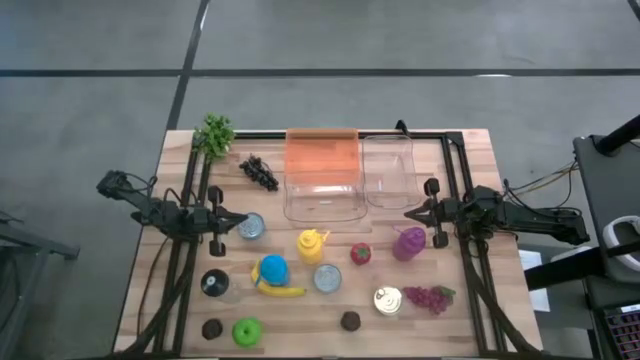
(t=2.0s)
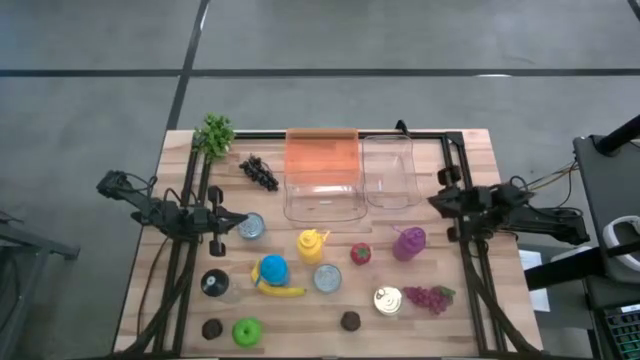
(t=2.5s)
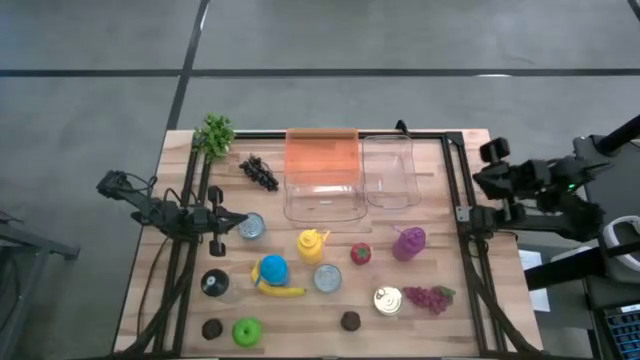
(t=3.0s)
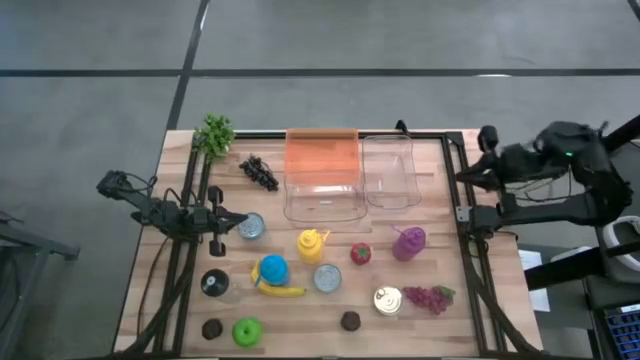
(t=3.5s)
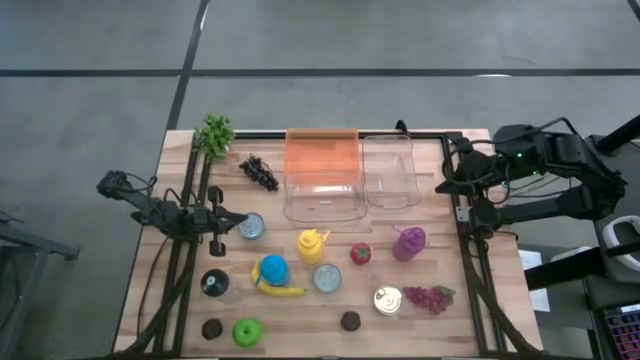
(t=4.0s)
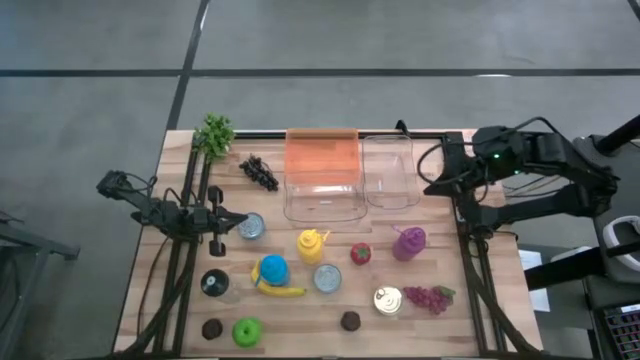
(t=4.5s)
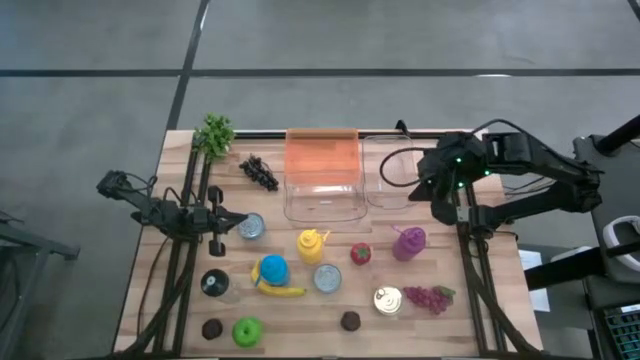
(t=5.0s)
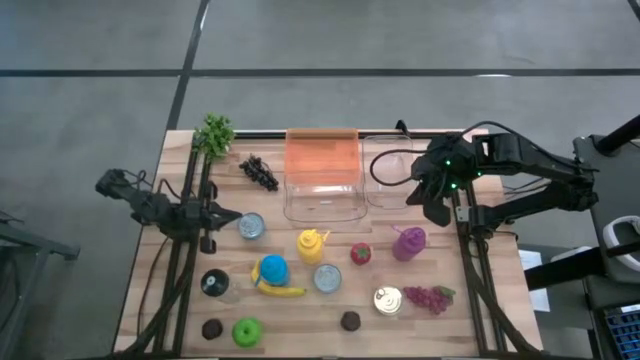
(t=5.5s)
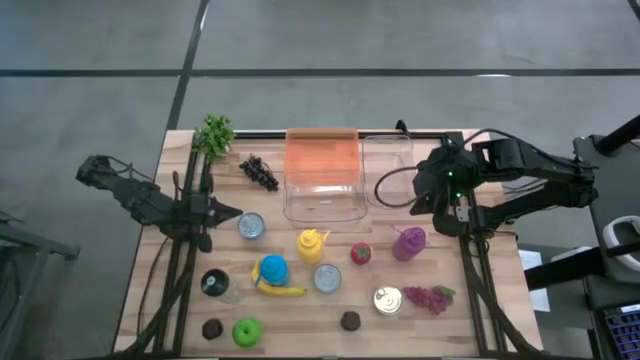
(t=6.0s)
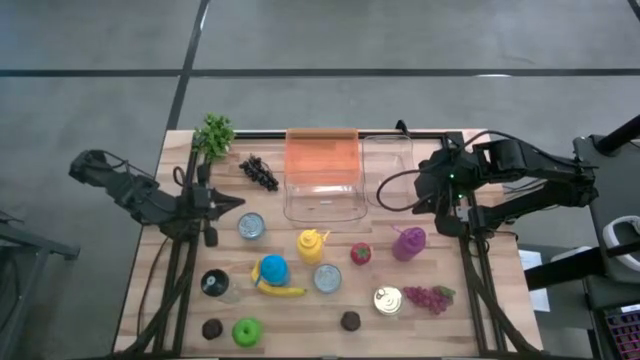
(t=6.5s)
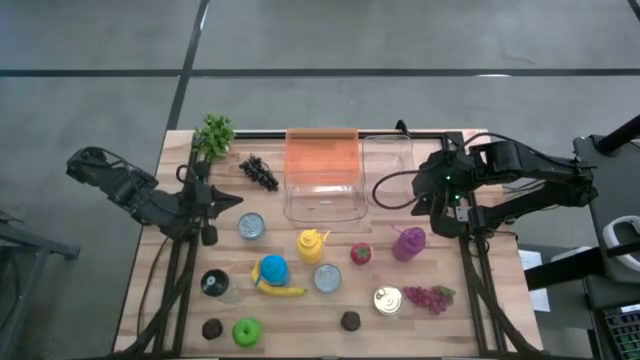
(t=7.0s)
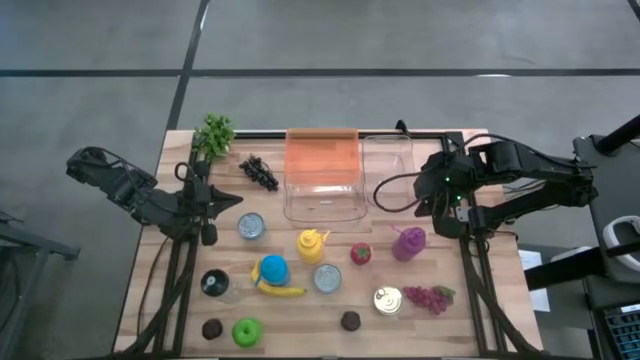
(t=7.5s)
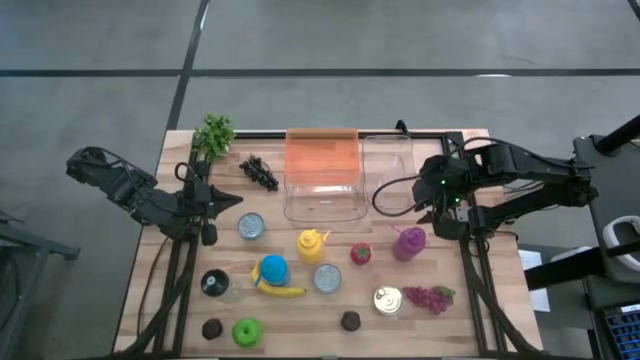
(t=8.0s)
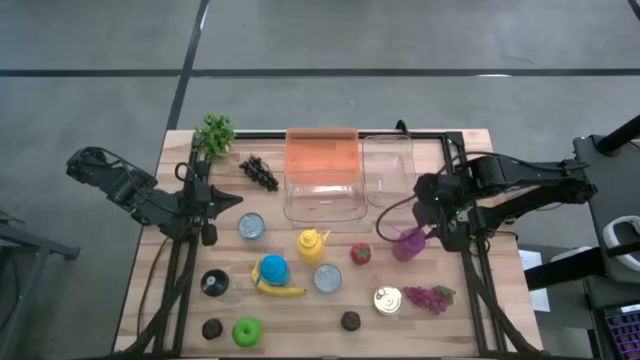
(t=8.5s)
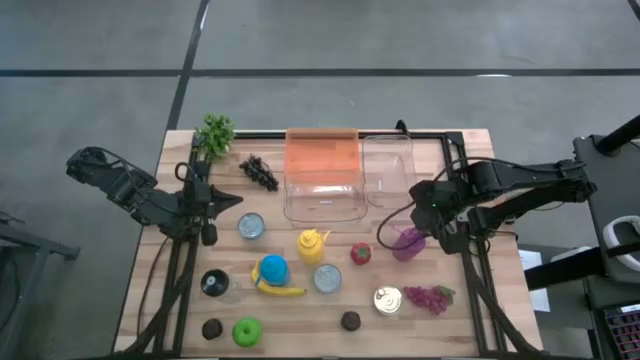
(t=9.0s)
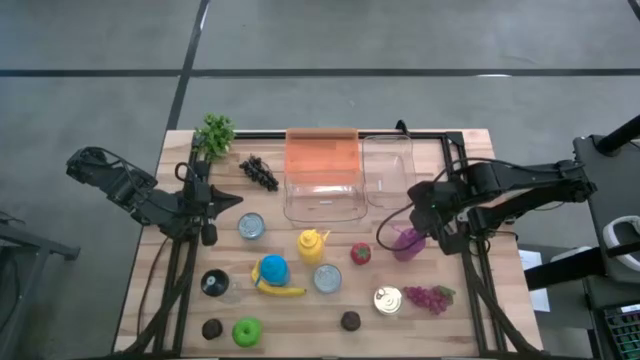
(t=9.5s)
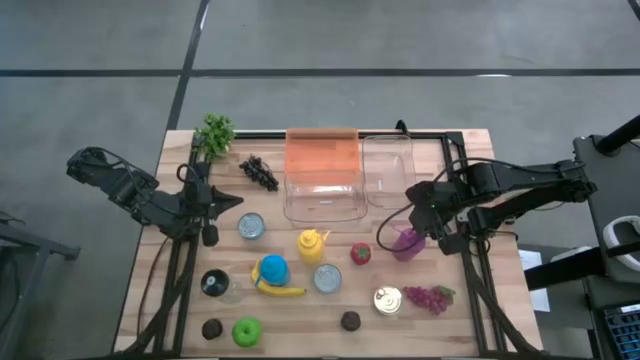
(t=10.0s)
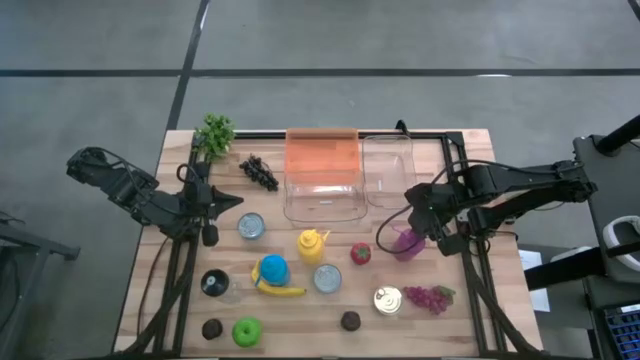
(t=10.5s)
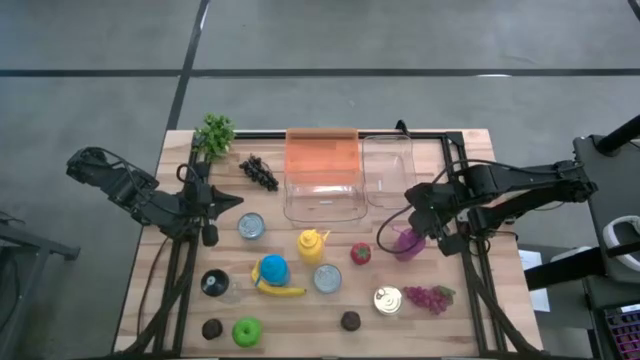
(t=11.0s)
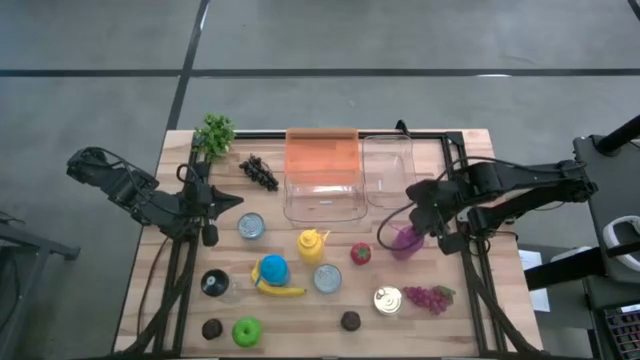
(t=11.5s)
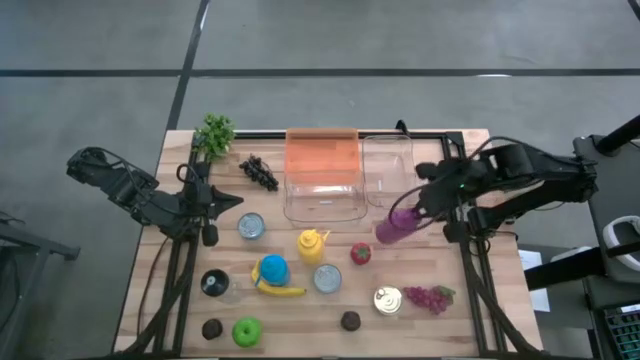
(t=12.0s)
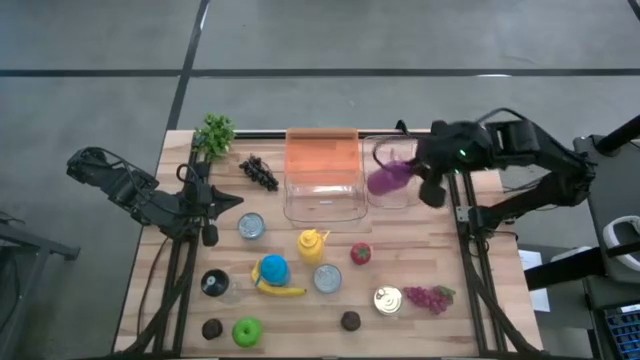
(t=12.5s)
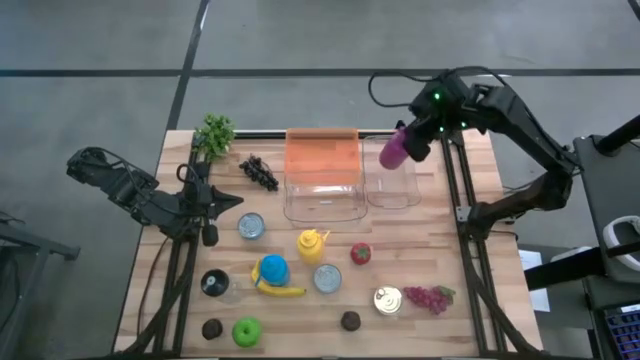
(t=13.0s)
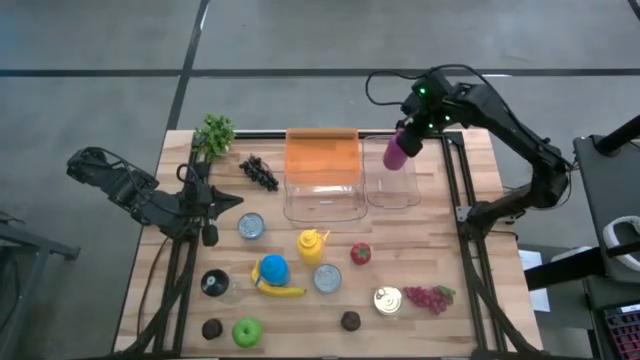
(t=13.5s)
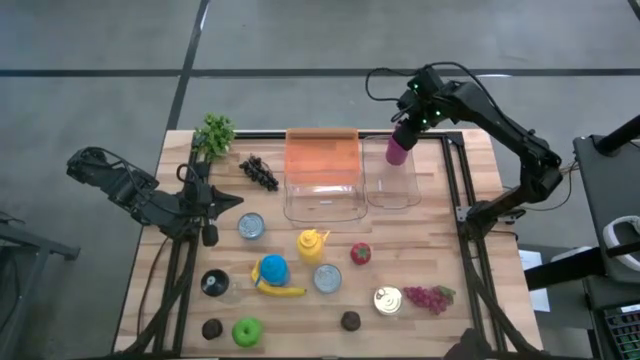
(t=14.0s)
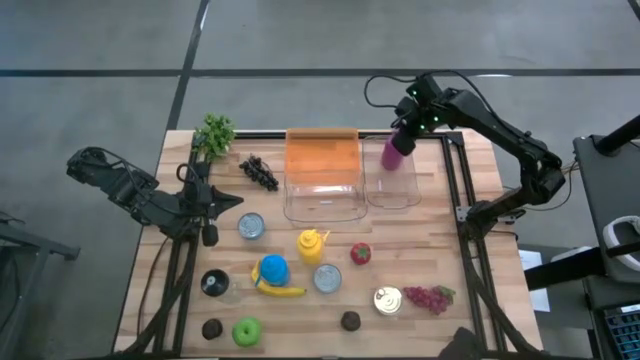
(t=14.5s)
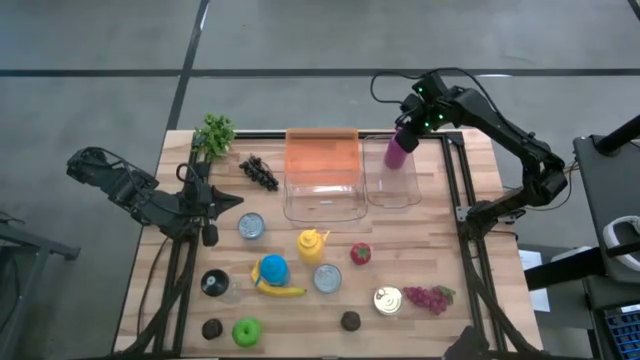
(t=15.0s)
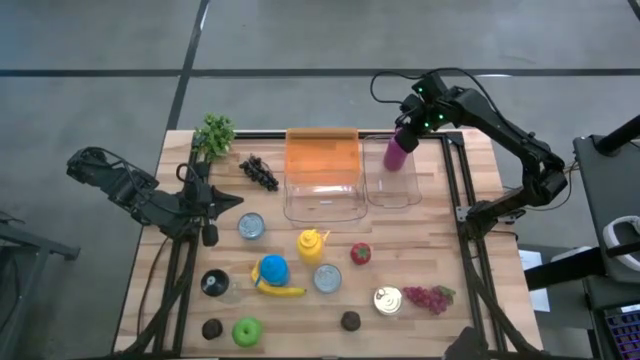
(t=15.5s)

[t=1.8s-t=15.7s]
Task: Pick & Place Food Item
Put the purple water bottle into the right transparent bin

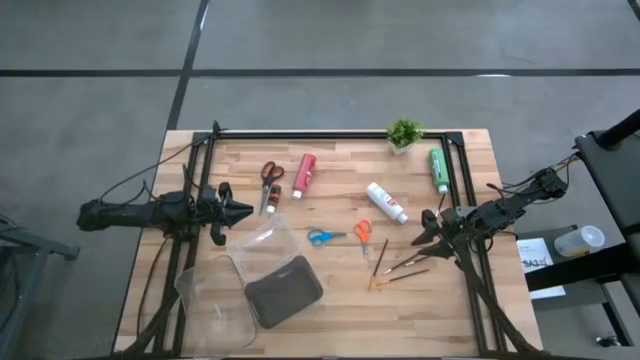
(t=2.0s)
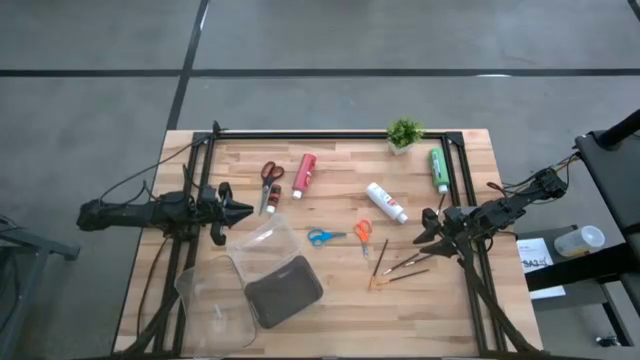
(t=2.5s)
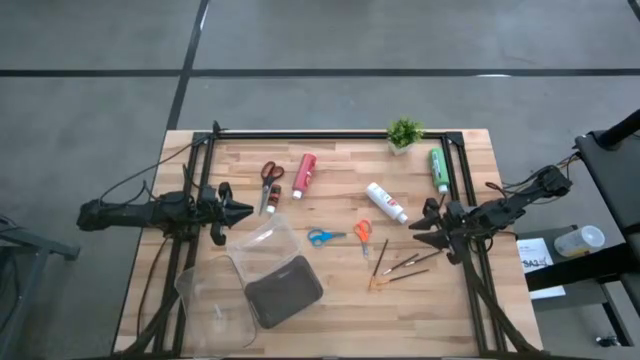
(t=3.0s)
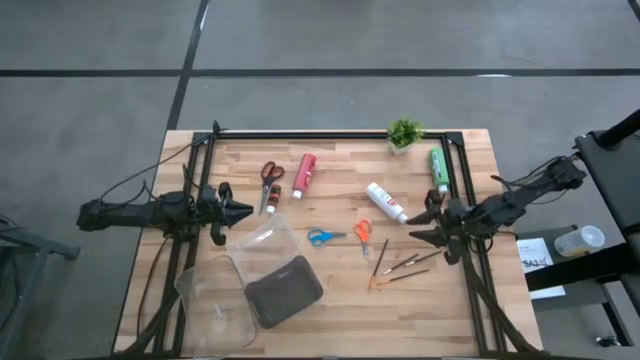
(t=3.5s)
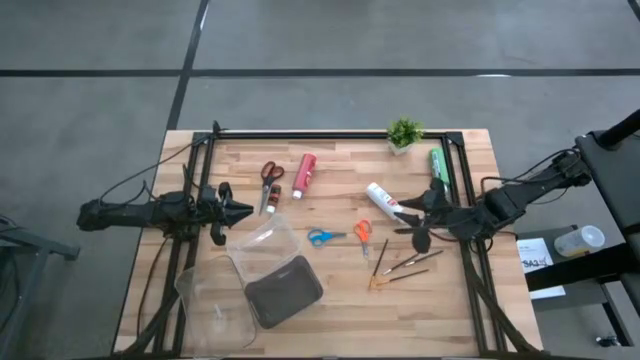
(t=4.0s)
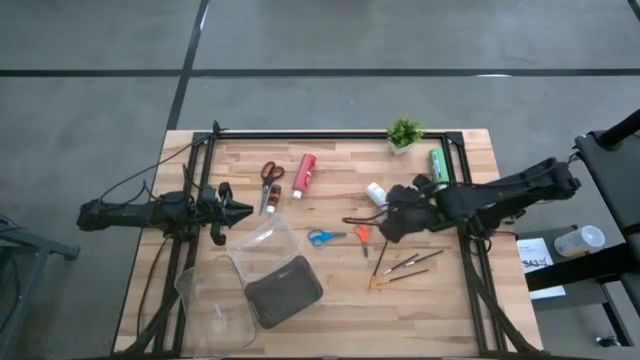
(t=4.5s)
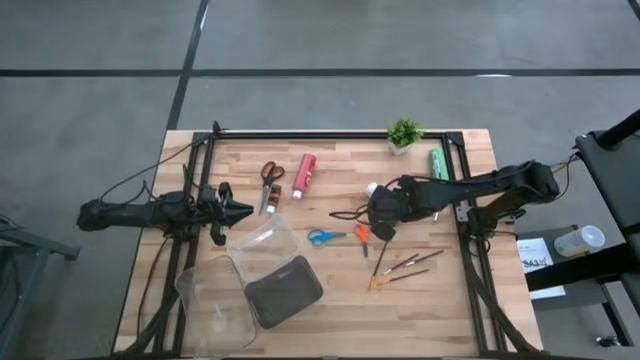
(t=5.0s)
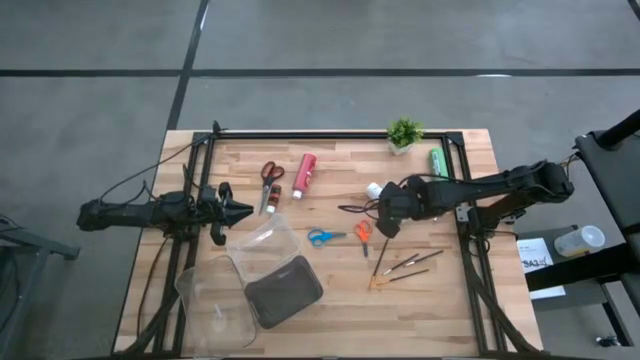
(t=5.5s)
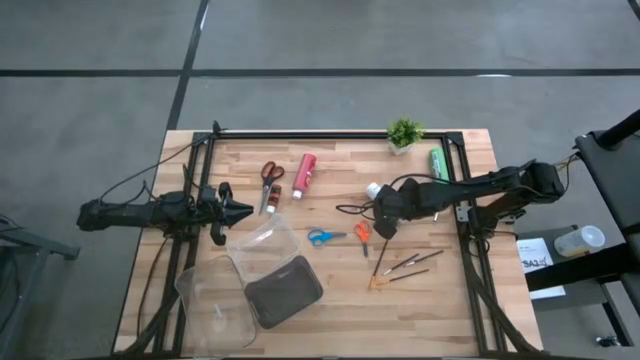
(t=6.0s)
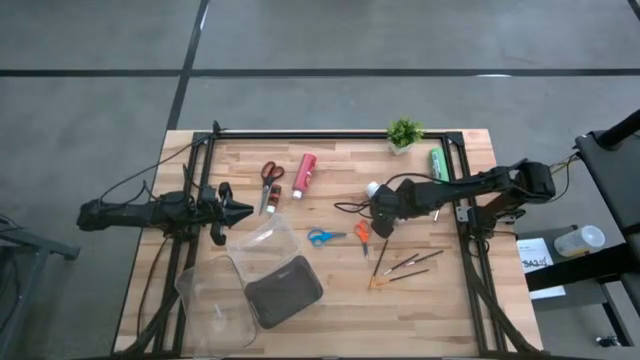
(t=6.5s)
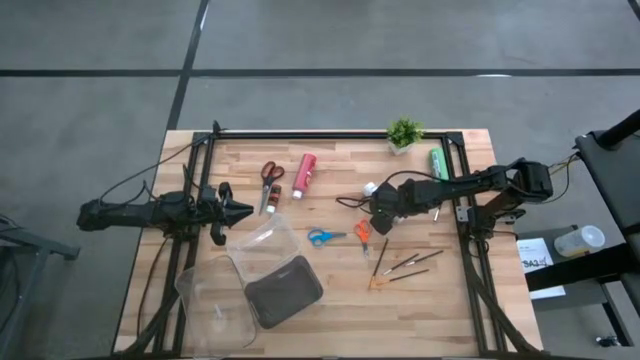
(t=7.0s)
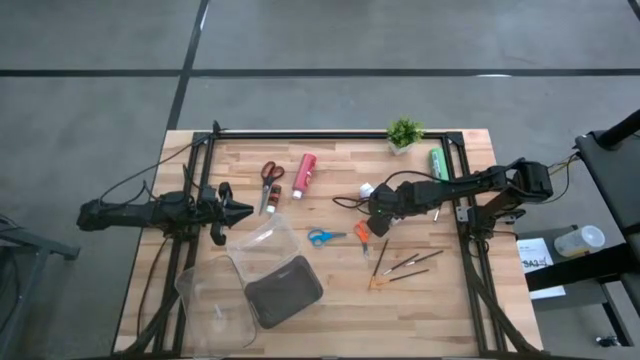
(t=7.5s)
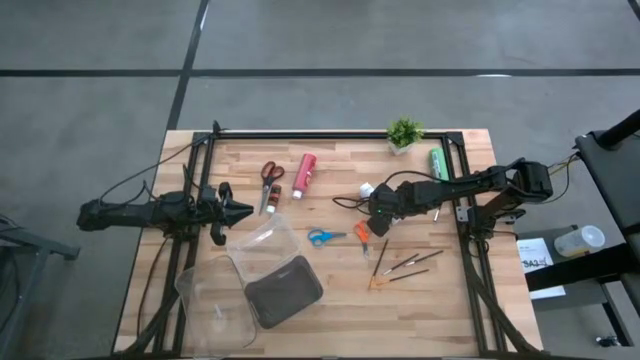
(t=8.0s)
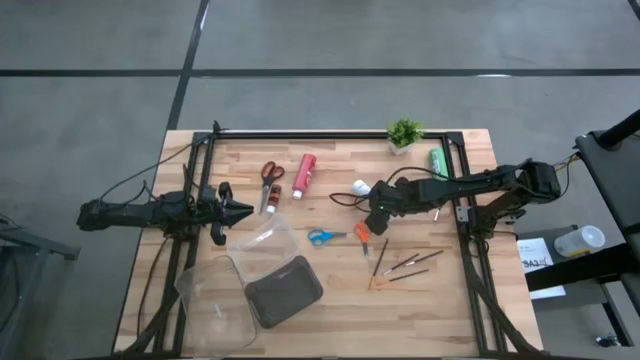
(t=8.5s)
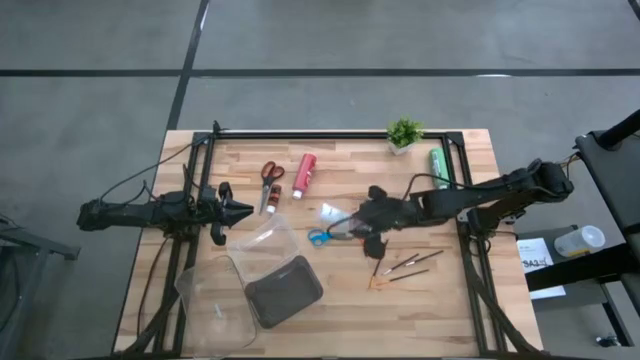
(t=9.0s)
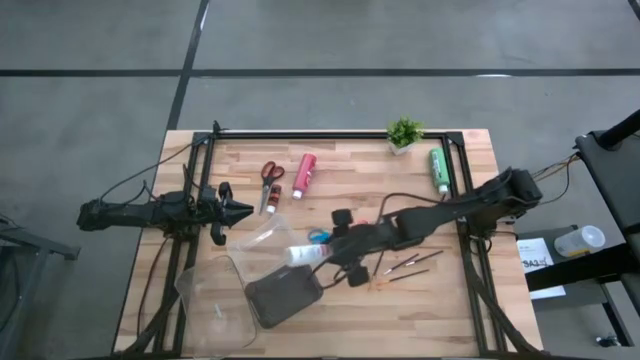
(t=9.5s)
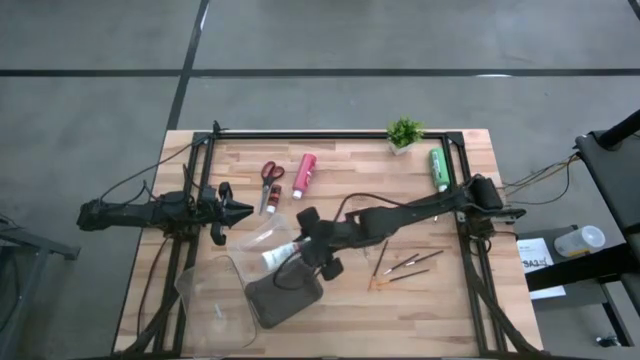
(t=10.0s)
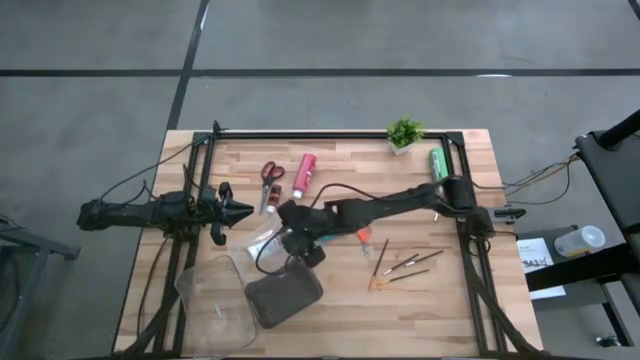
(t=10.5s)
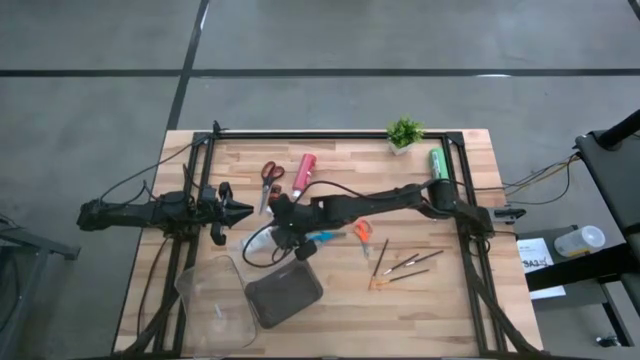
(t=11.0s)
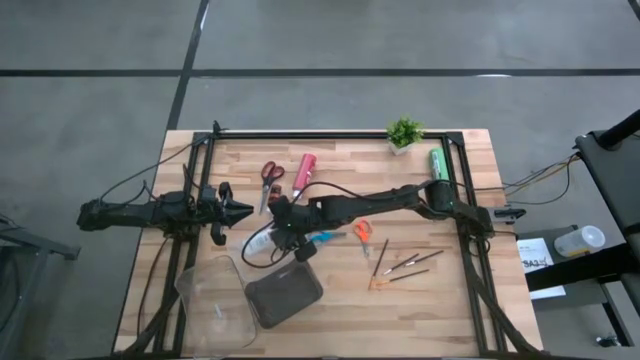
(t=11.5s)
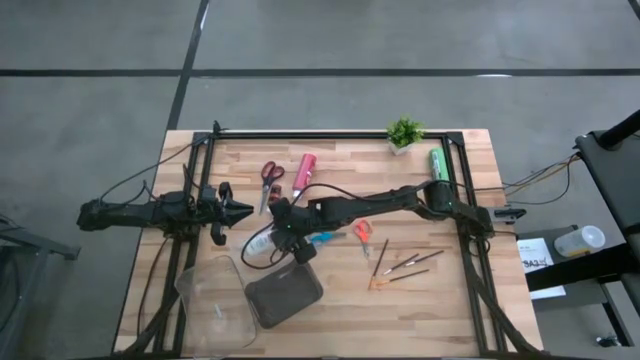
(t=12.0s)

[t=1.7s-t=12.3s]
Task: Pick & Place Paint Supplies
Put the white paint bottle into the top transparent bin
